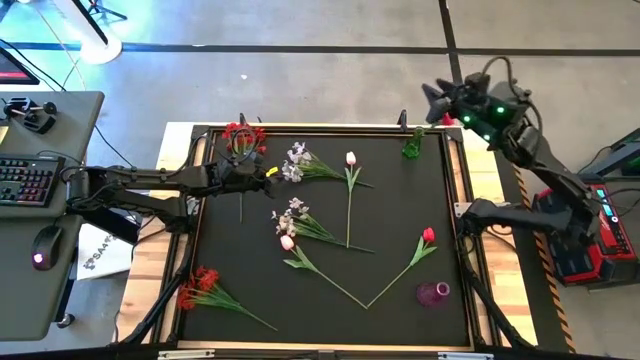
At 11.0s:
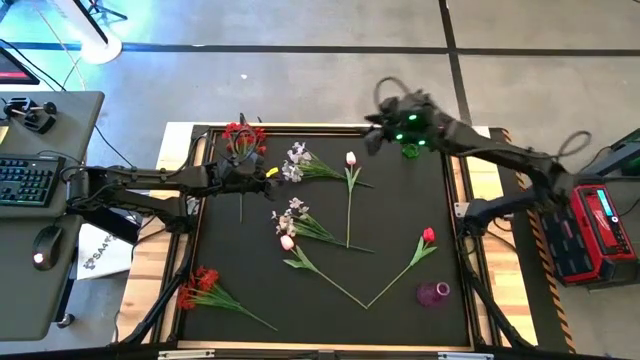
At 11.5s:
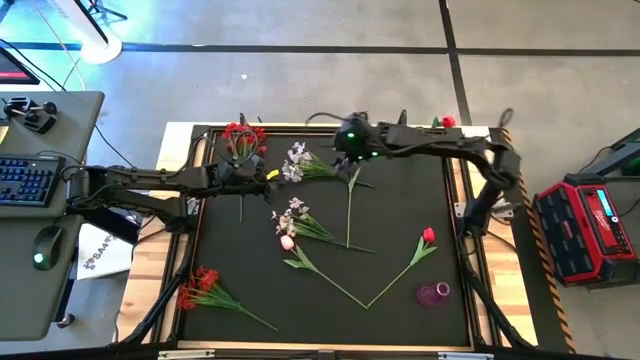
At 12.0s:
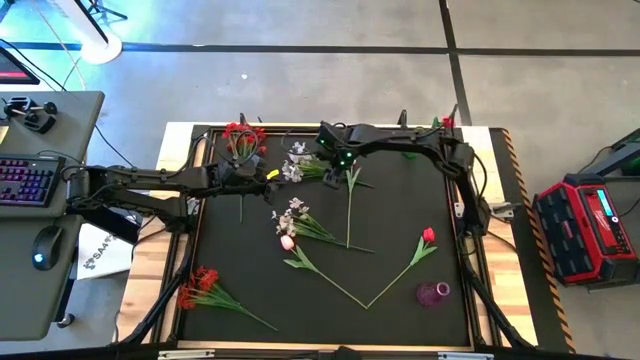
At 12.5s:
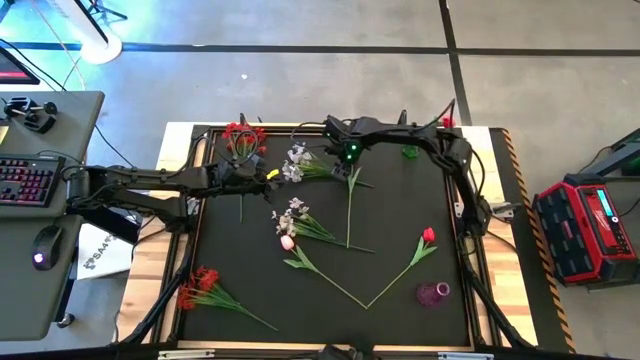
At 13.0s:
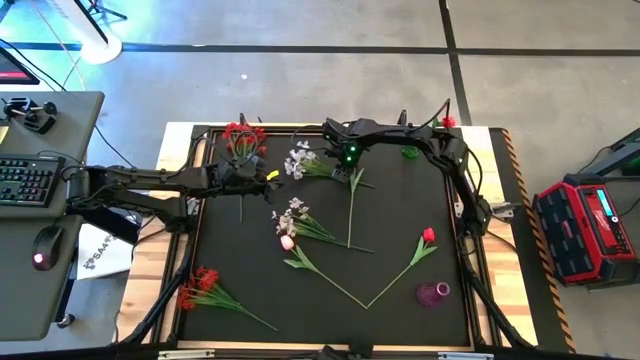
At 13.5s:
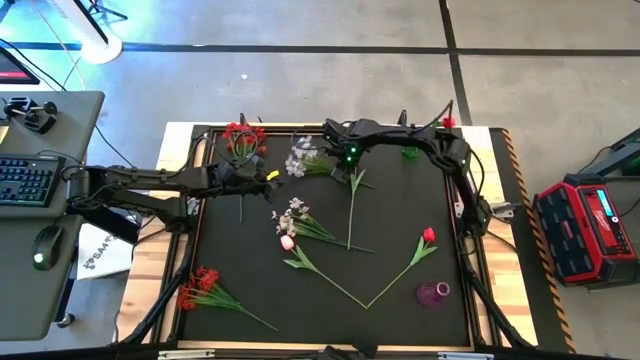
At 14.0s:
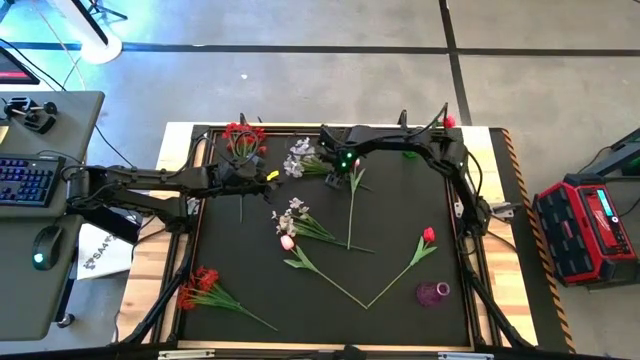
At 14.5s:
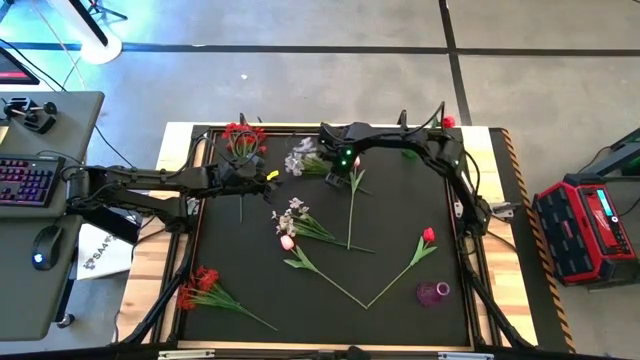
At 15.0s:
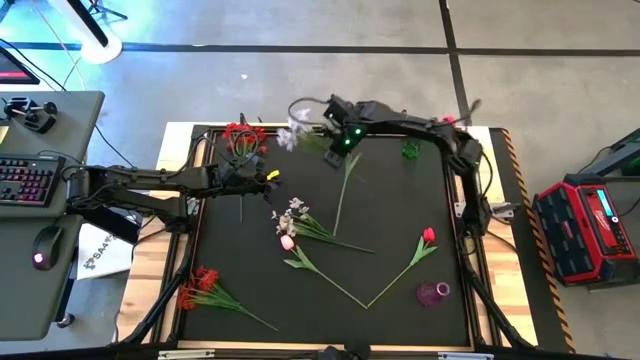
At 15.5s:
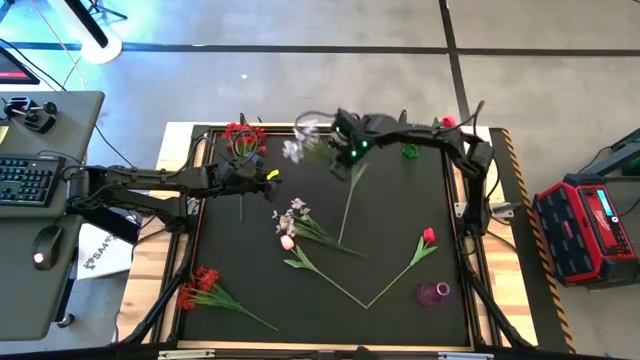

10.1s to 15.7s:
Task: Sort flowers into vase by color
Put the top white flowers into the green vase

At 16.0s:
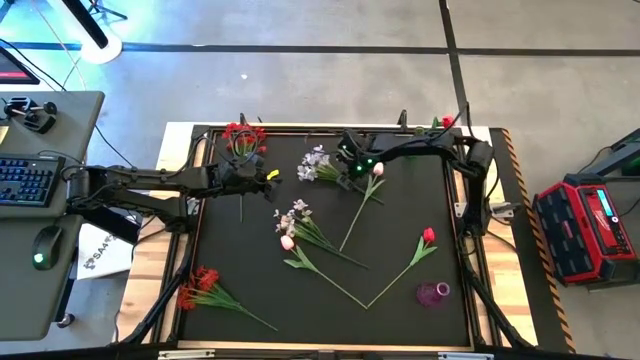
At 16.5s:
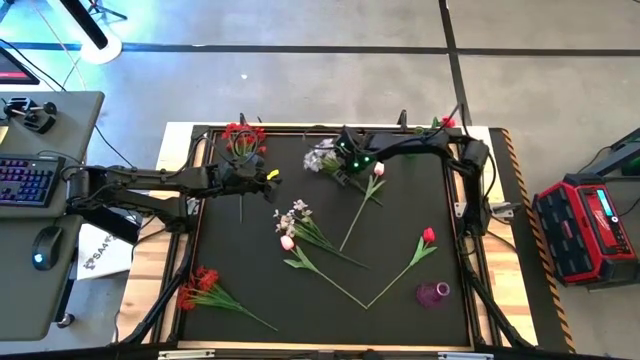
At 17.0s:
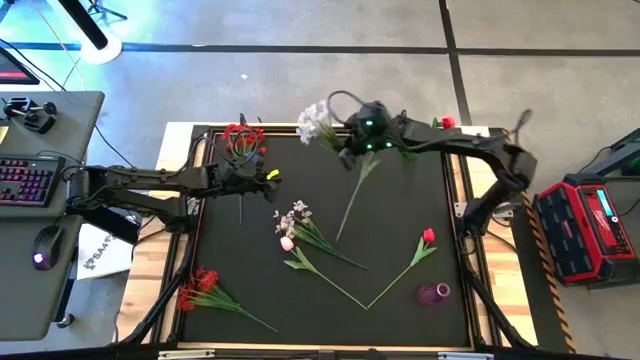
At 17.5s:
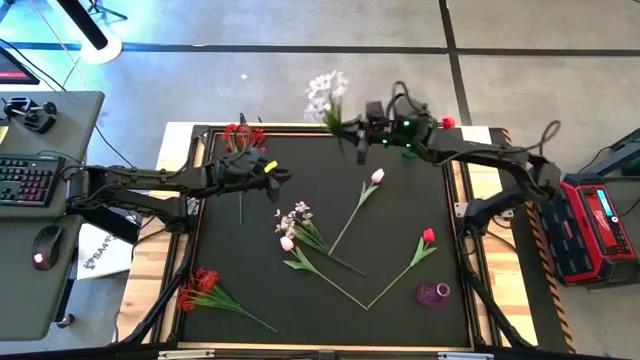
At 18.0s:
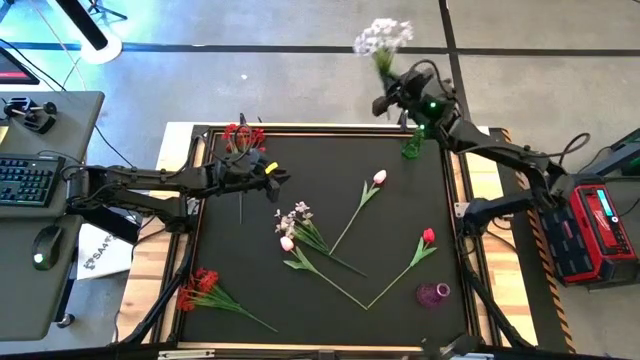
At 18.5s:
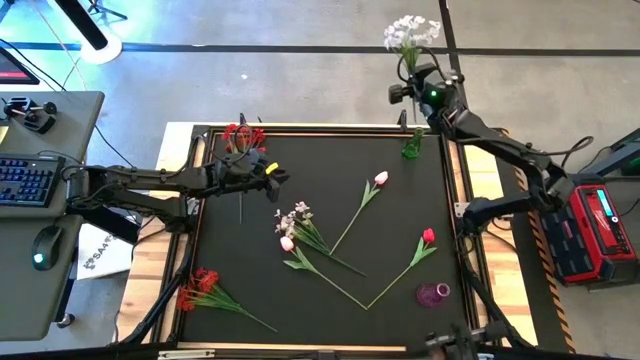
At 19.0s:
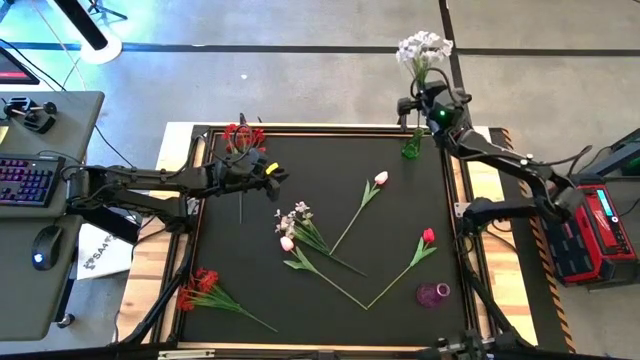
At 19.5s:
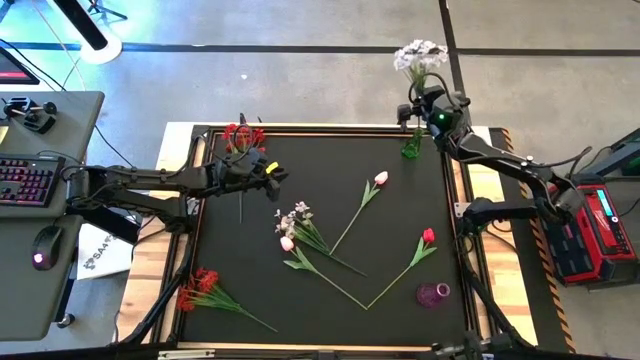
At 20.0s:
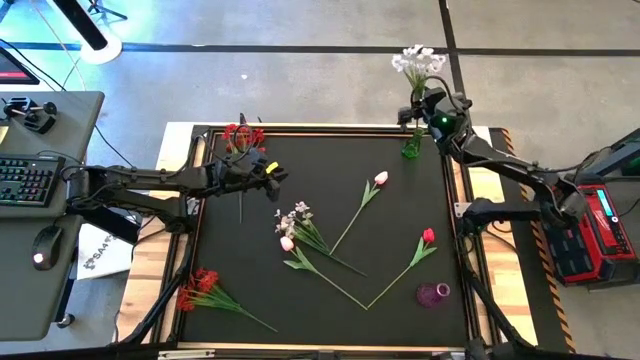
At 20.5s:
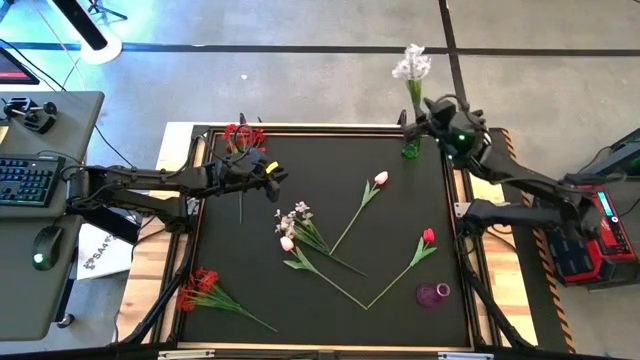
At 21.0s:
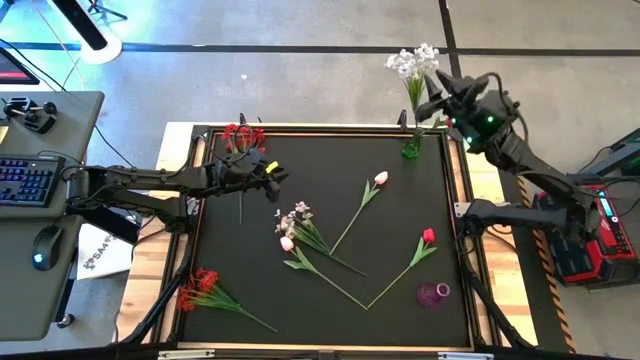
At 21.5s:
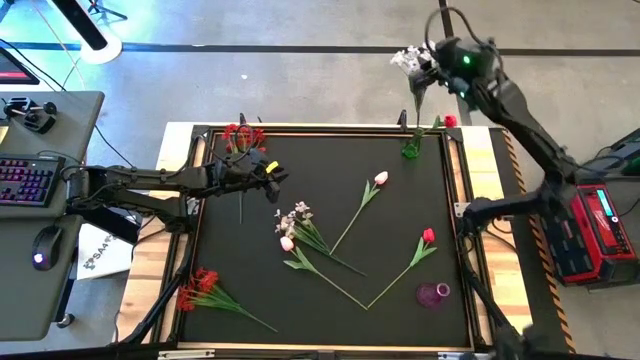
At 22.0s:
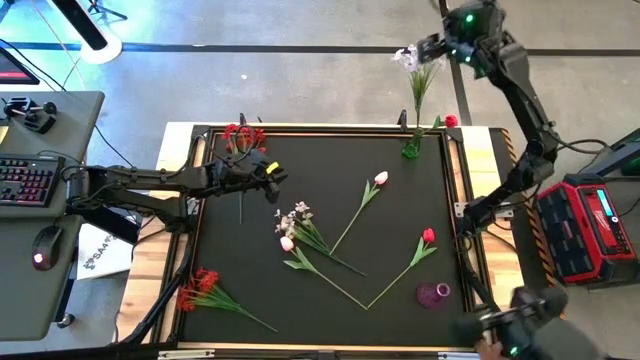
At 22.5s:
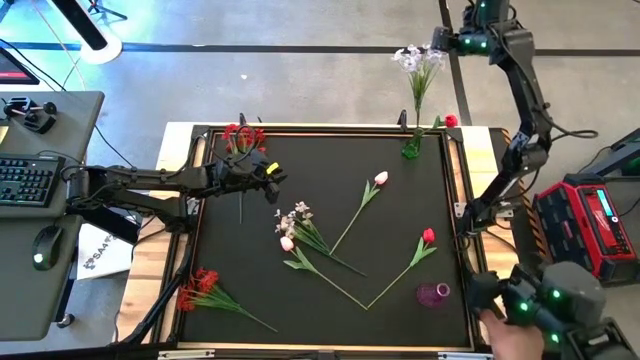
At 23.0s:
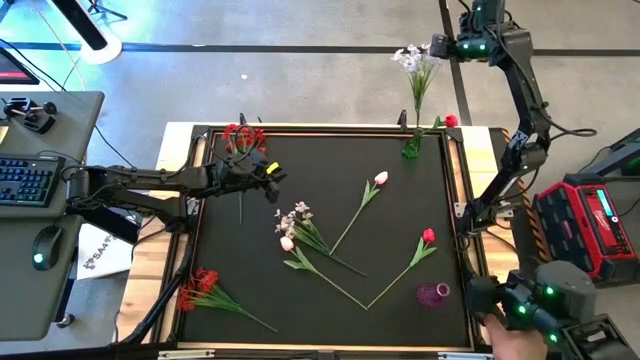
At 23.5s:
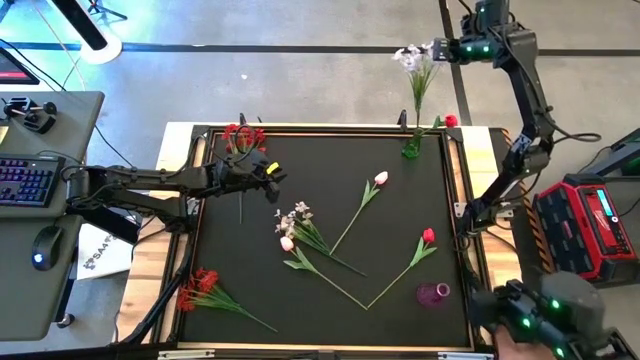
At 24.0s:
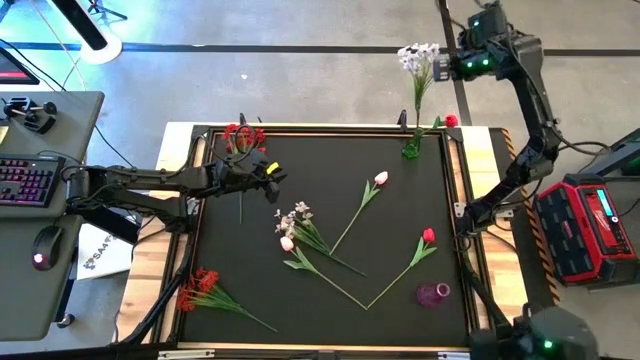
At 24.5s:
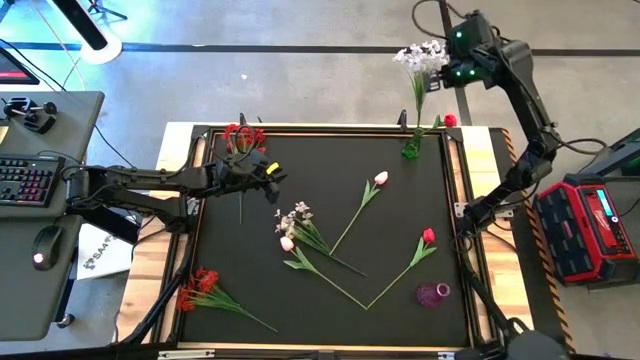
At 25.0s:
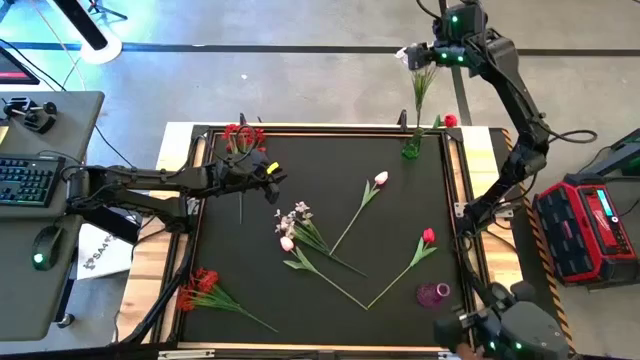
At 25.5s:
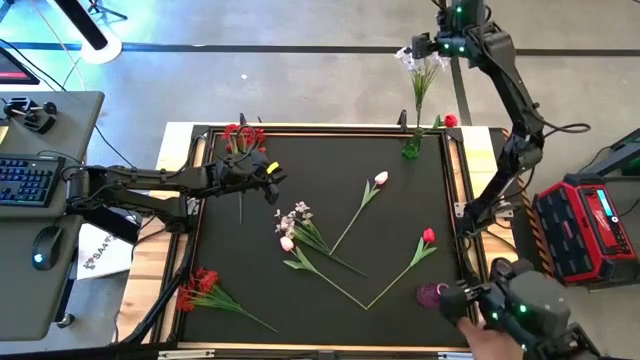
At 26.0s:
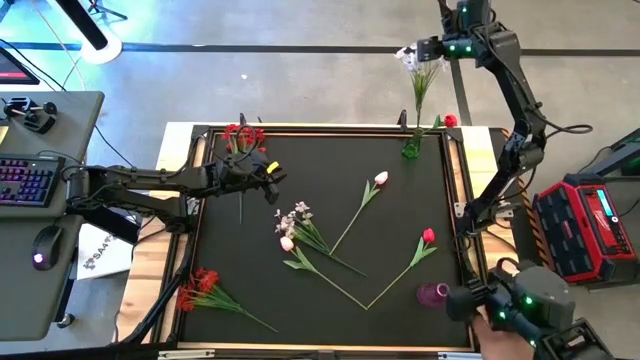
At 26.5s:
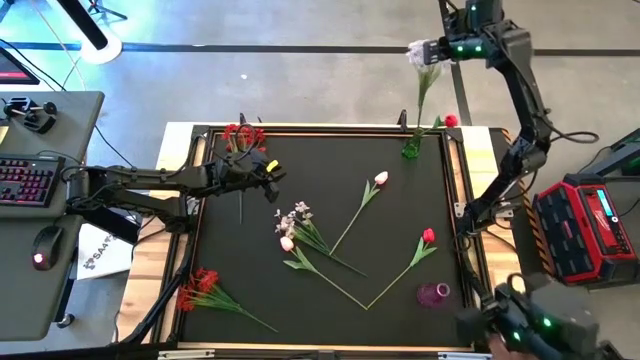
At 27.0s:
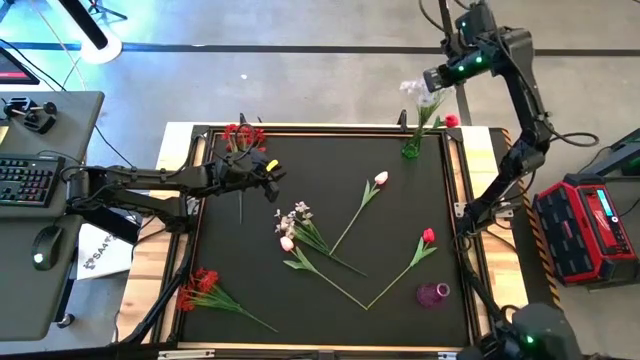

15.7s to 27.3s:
Put the top white flowers into the green vase

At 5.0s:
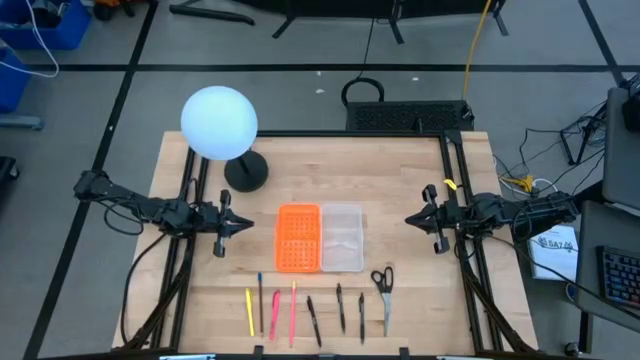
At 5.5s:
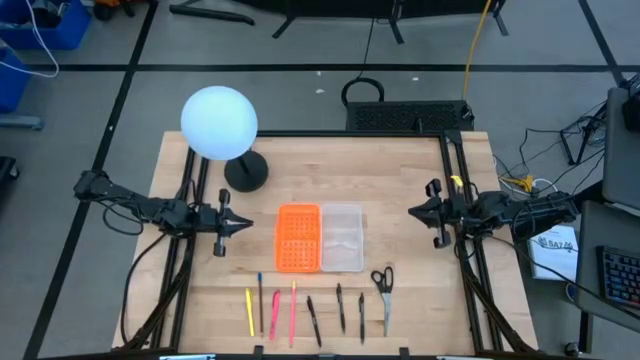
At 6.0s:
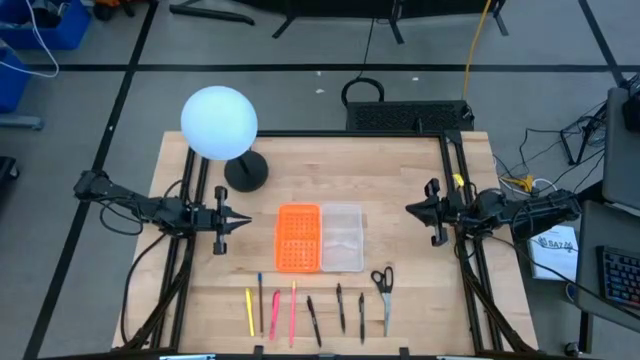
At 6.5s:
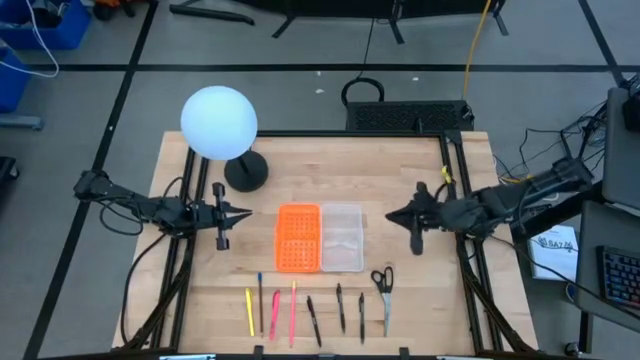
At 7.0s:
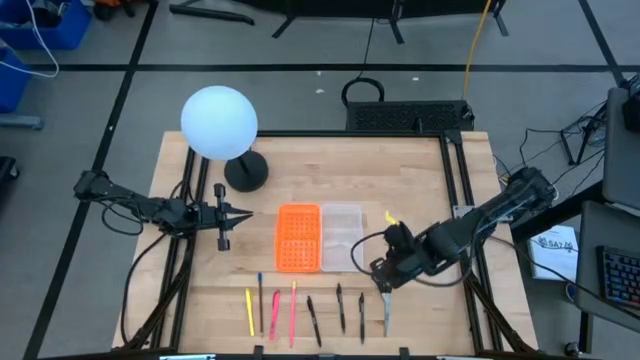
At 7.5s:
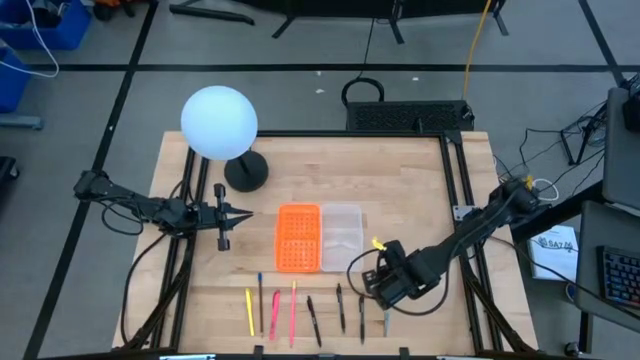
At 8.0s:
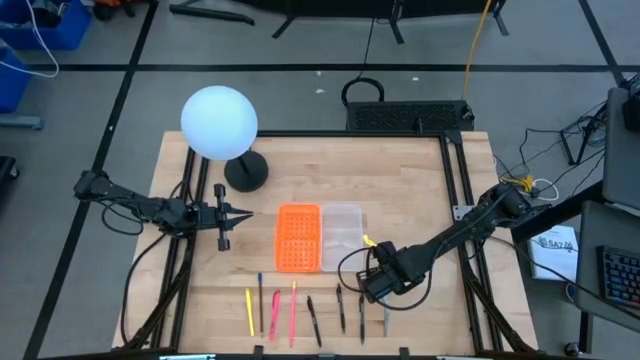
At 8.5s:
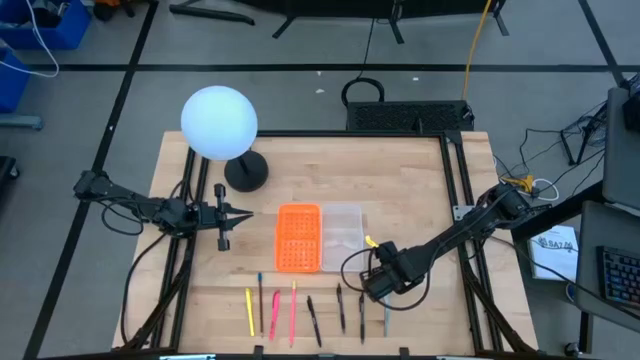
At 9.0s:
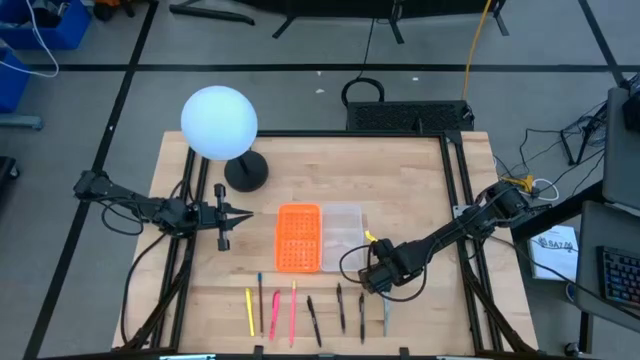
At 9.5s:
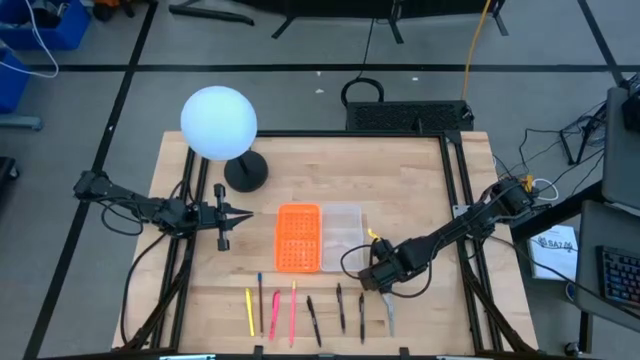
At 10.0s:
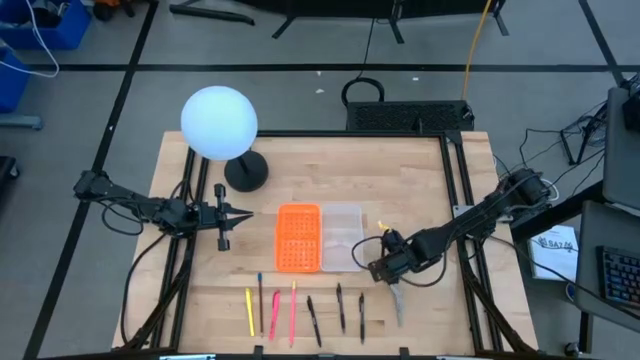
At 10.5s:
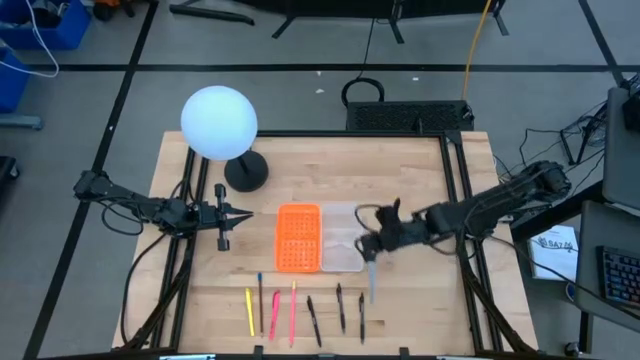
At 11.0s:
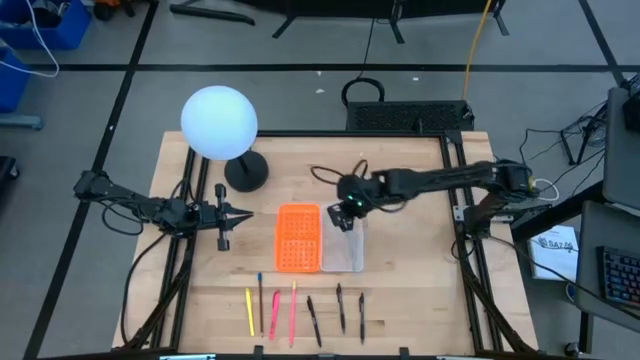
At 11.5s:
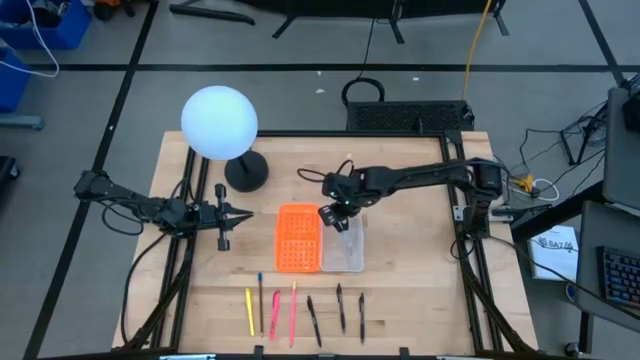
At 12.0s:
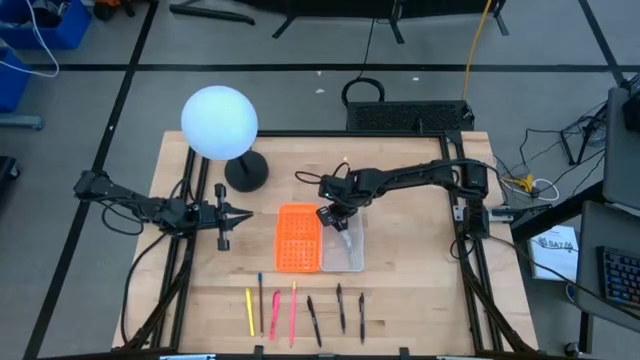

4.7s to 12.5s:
Task: Pick & place school supplies into a supply box
Put the black scissors into the orange and white supply box
